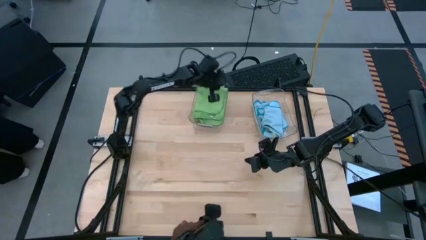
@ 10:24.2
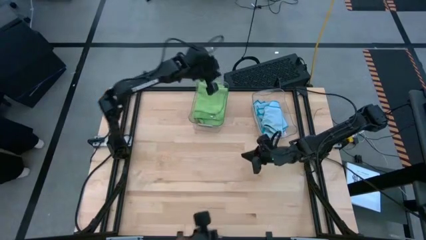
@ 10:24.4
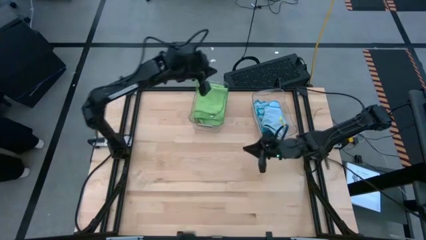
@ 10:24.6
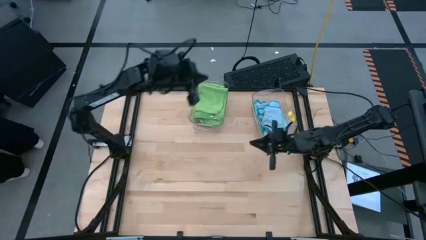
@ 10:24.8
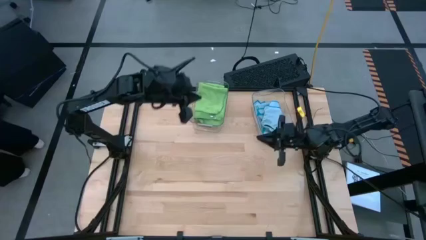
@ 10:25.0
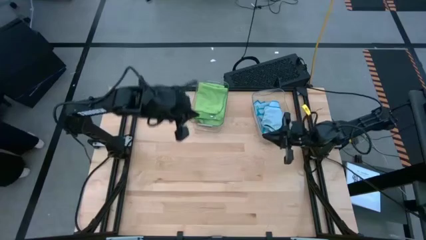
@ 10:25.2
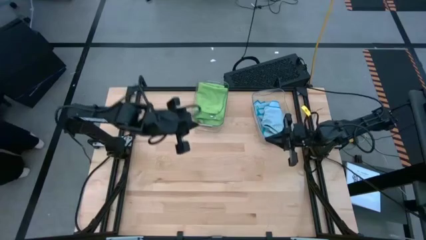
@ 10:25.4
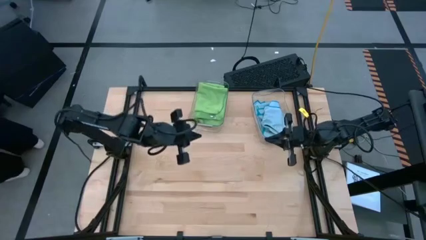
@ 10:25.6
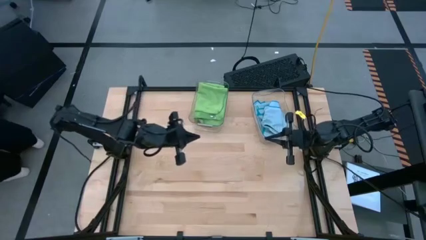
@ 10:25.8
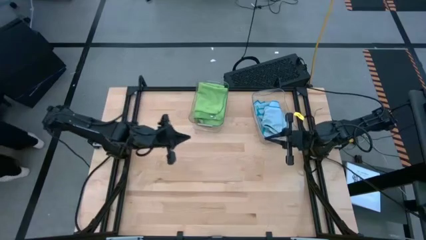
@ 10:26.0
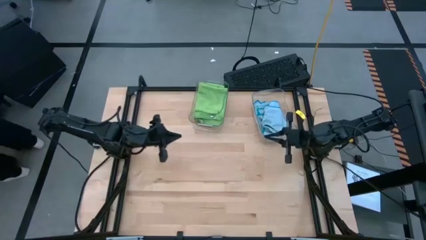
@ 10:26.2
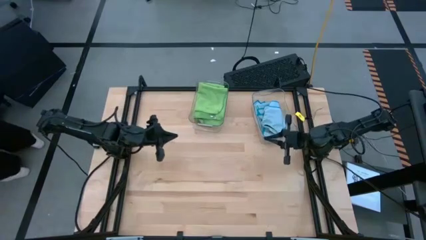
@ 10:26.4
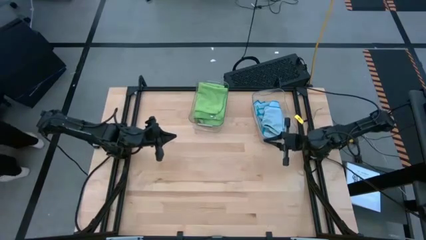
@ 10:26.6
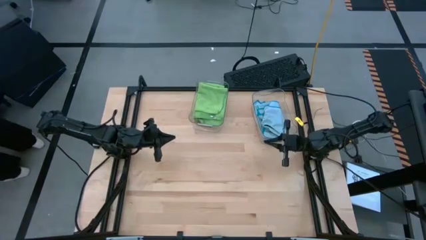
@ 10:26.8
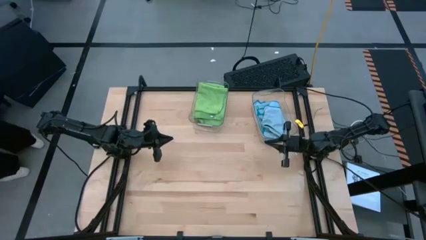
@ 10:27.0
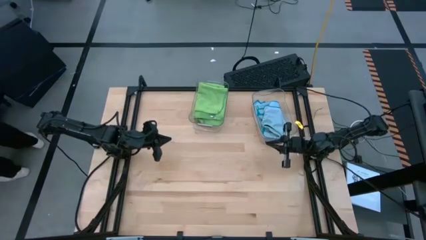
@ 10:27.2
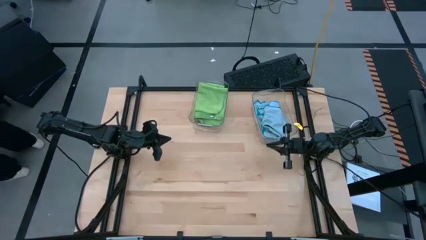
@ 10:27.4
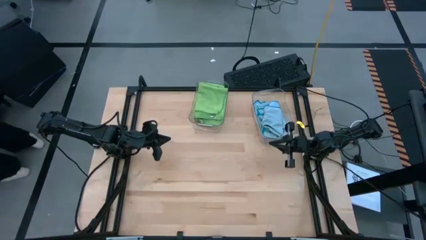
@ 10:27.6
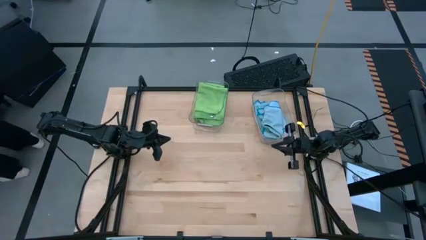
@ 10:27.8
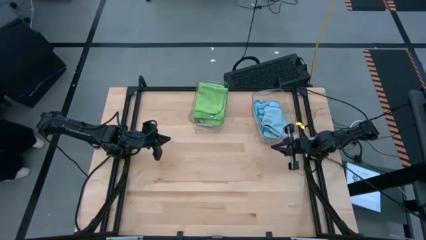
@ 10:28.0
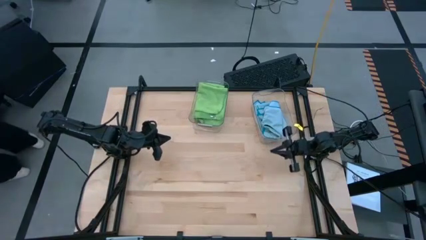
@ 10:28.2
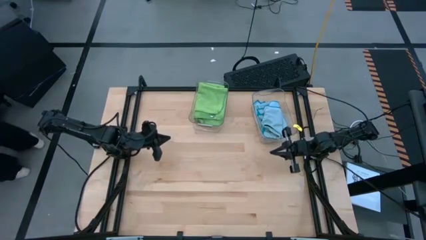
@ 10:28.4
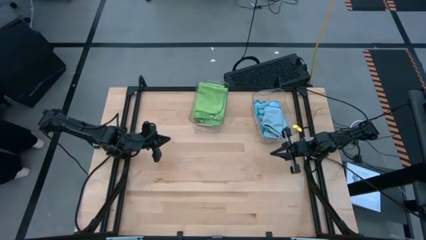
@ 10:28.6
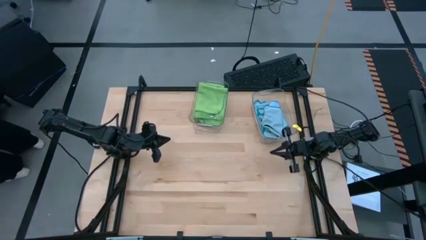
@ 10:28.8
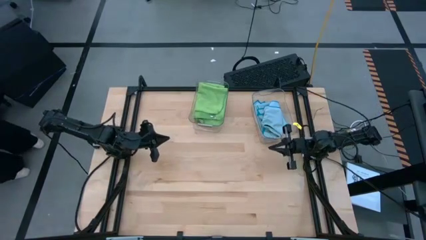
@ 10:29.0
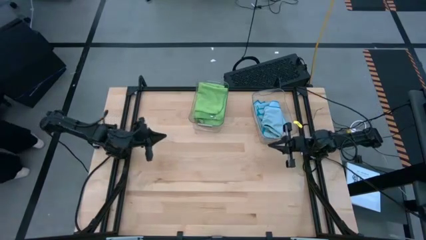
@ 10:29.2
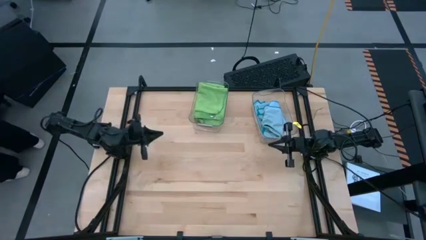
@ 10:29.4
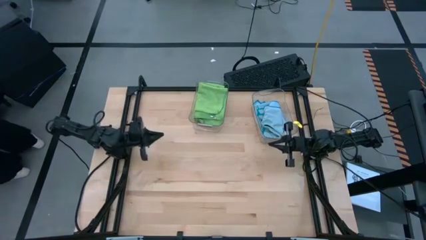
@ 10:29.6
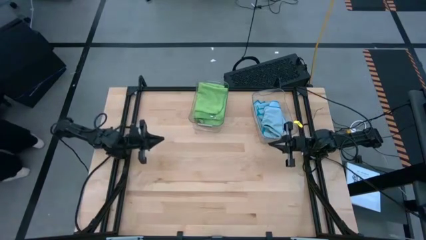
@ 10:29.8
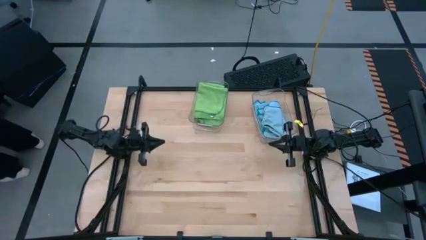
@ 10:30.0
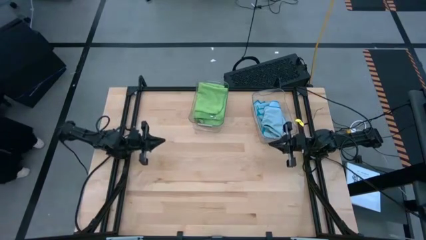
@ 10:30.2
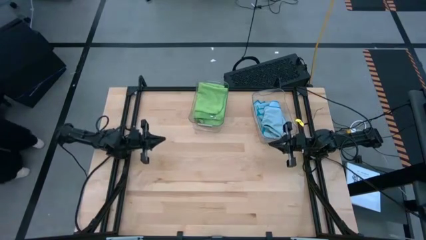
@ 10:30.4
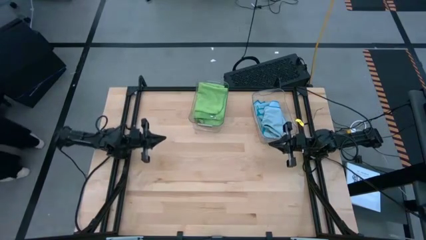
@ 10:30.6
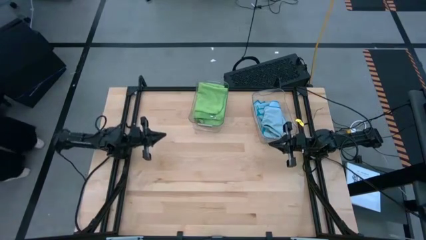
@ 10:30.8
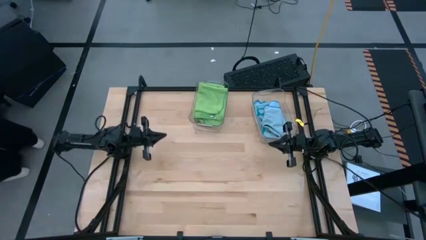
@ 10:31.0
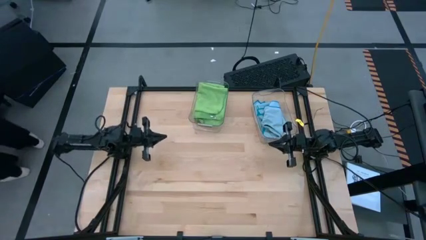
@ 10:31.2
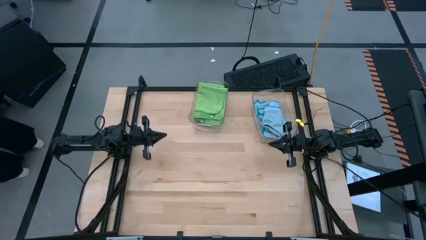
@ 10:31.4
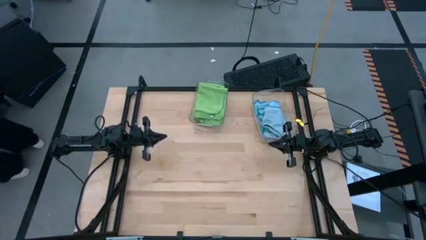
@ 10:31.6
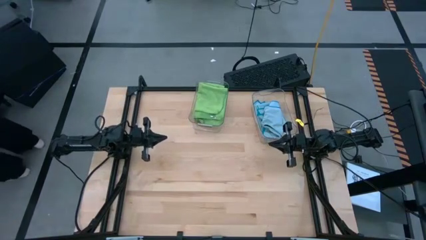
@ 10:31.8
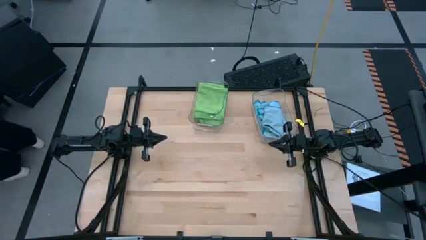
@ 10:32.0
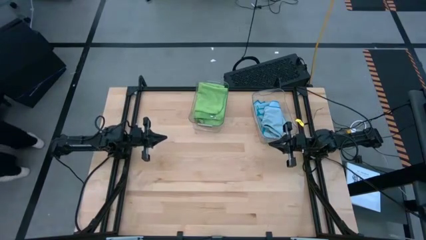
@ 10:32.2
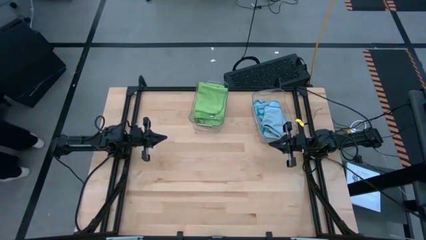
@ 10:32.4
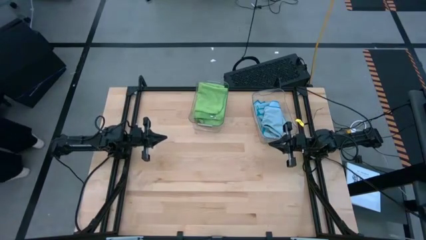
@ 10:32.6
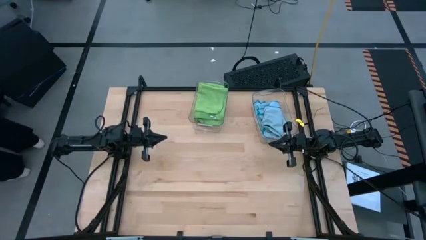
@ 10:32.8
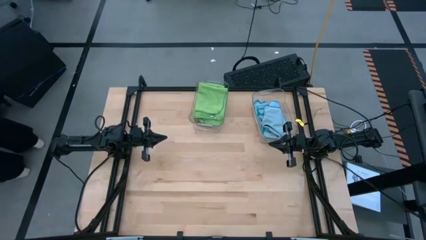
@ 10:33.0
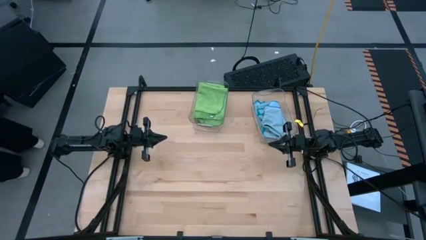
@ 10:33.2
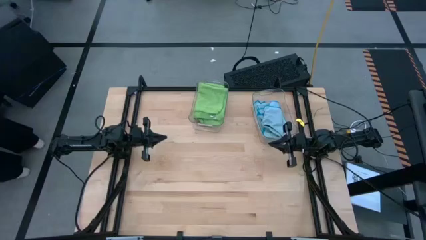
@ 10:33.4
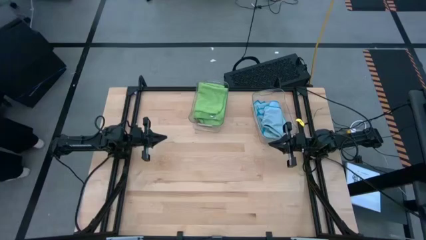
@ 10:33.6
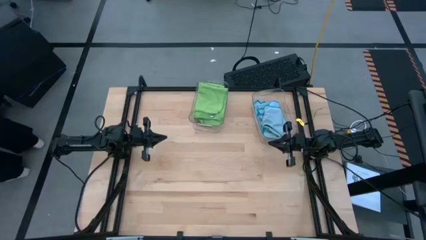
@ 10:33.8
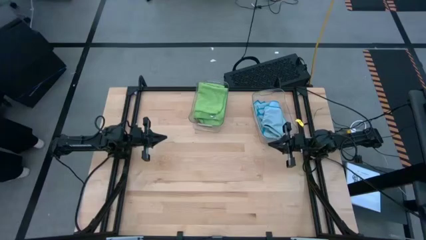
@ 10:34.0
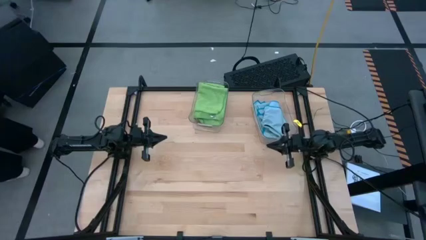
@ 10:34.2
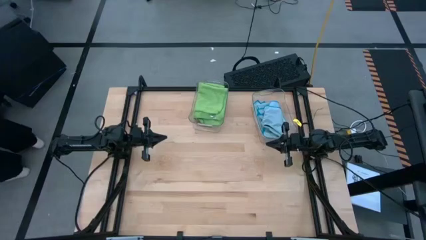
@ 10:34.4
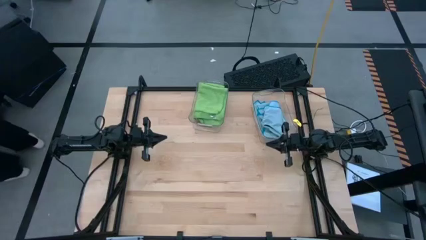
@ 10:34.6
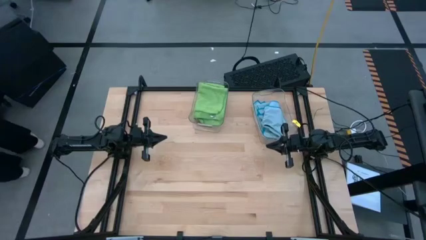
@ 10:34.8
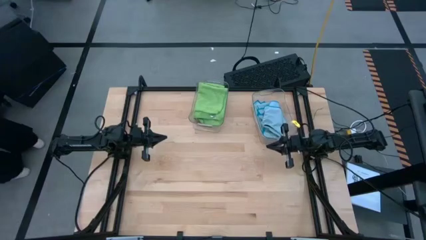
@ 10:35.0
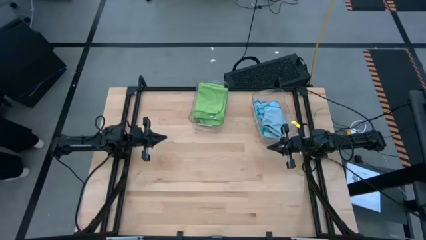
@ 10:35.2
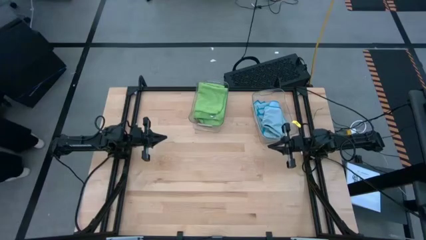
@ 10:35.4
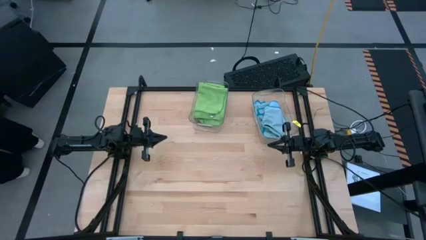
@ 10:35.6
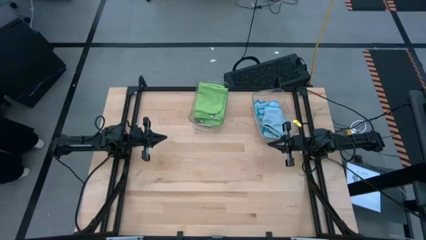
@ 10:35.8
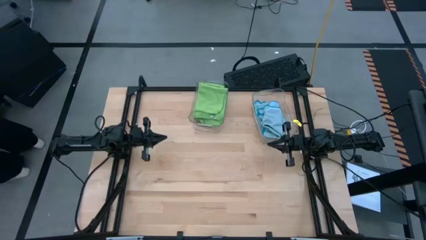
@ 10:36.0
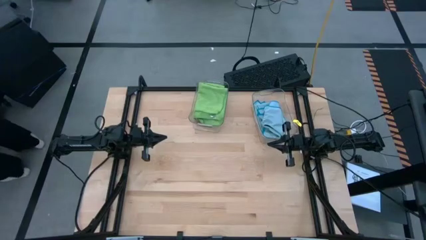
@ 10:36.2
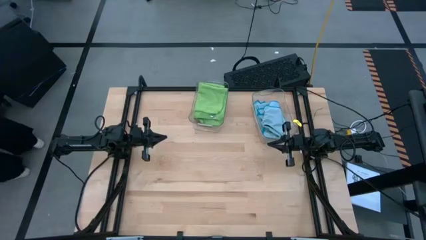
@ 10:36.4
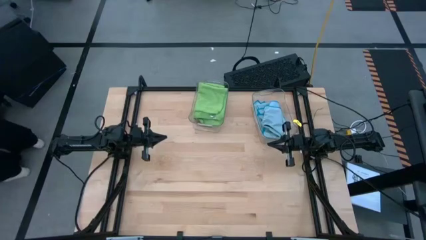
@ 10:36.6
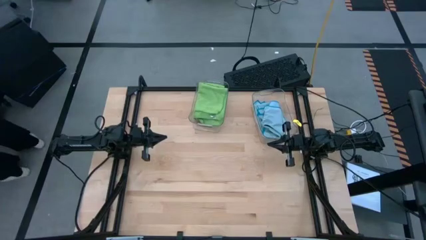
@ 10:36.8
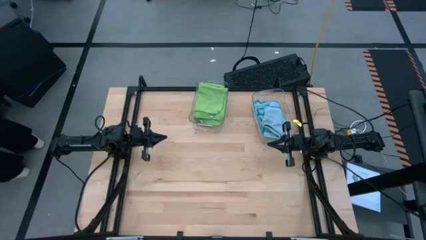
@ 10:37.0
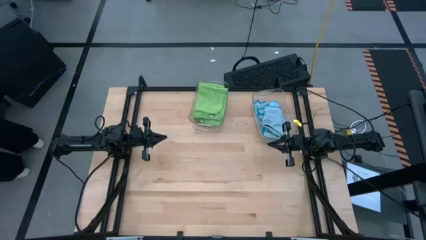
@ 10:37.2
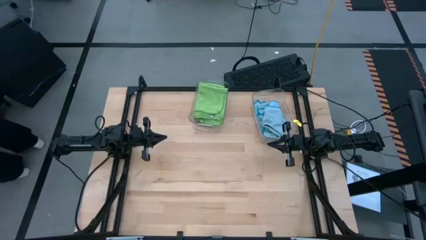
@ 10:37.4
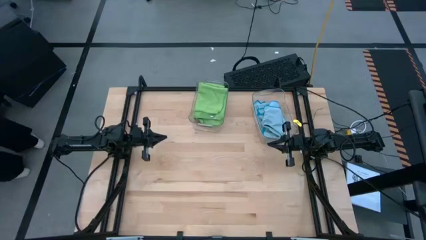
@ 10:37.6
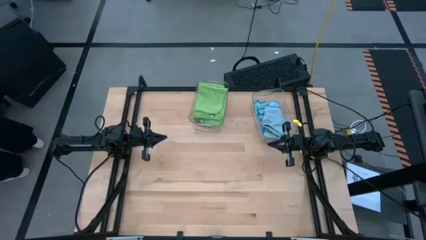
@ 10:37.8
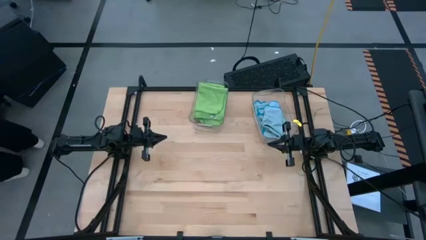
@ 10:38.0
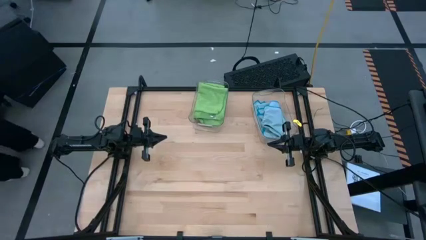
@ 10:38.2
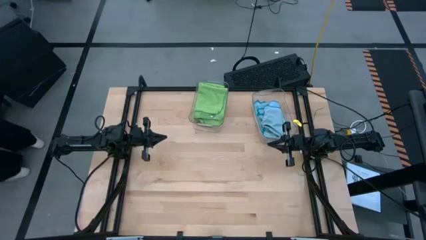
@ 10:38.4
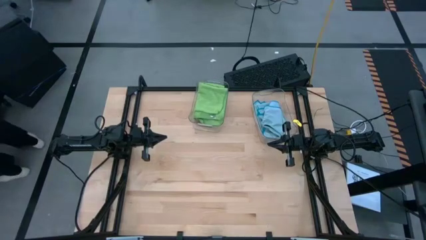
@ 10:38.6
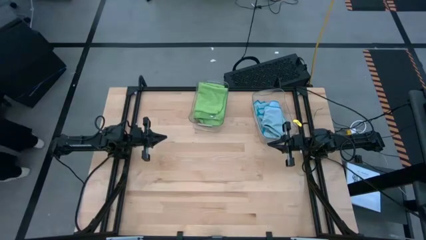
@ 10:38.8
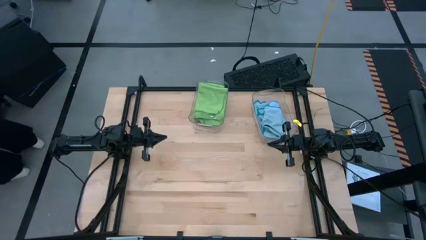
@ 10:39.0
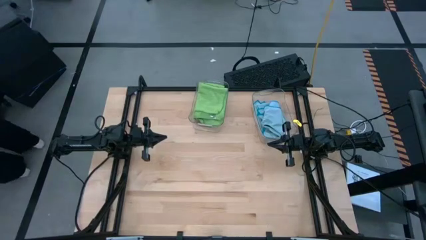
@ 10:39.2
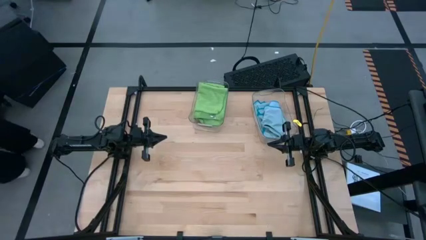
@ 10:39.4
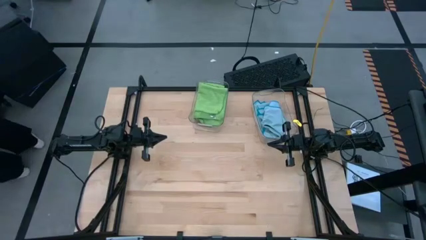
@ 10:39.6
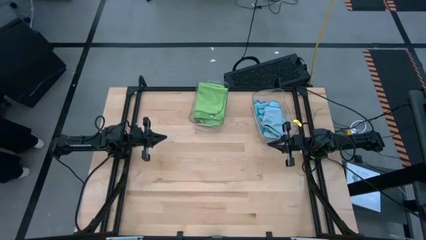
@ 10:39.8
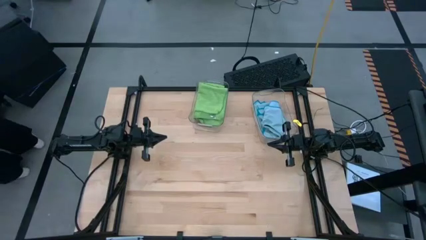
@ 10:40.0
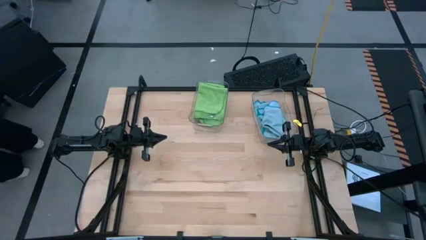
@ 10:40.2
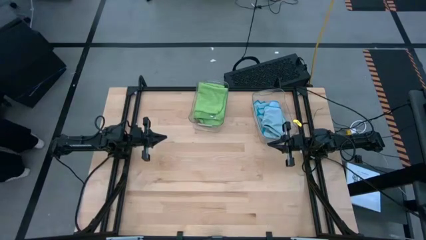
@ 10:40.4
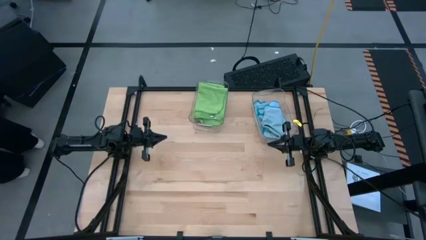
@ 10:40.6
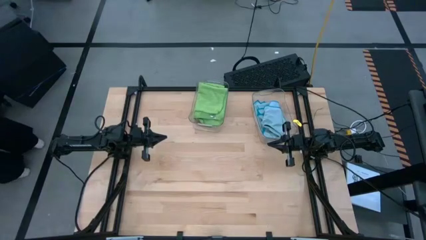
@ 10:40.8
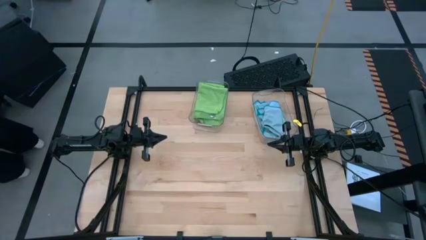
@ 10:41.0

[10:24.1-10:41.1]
Task: Fold microfiber towels
Return to Home Position
